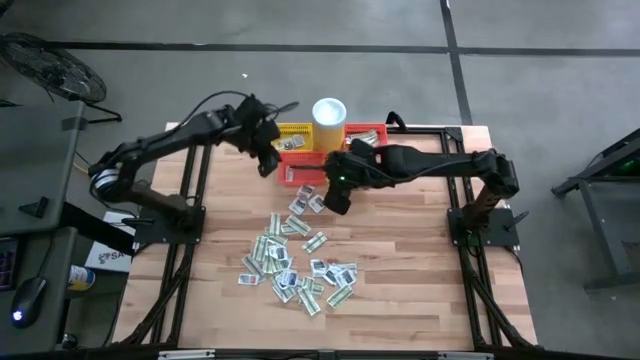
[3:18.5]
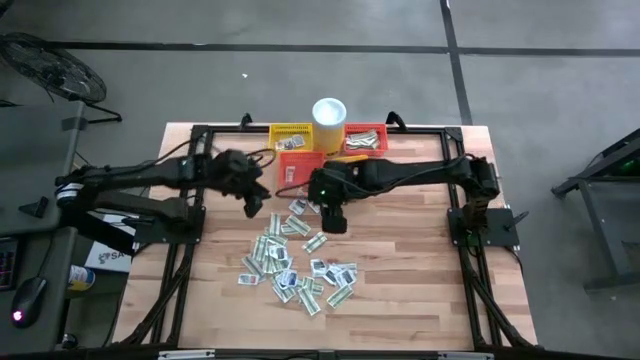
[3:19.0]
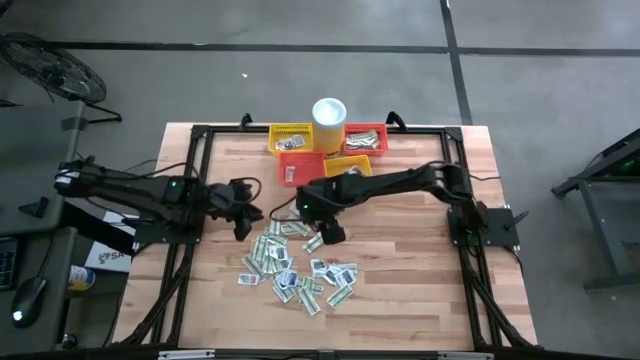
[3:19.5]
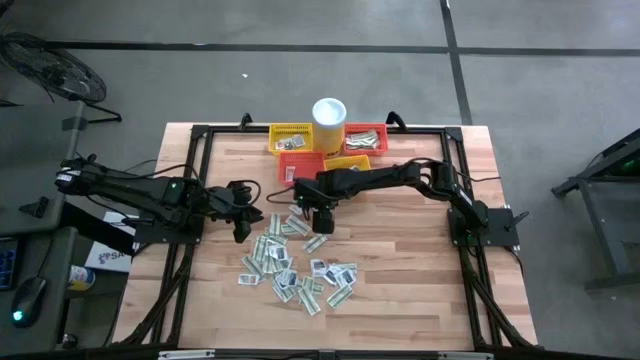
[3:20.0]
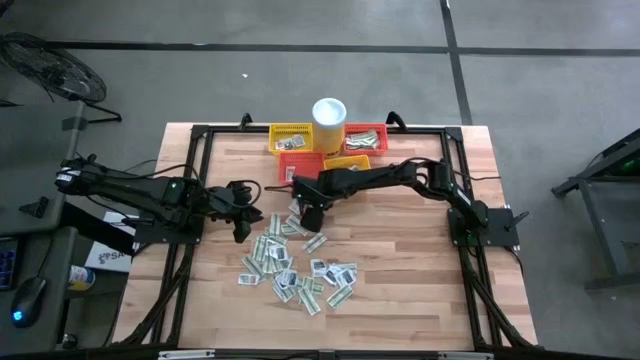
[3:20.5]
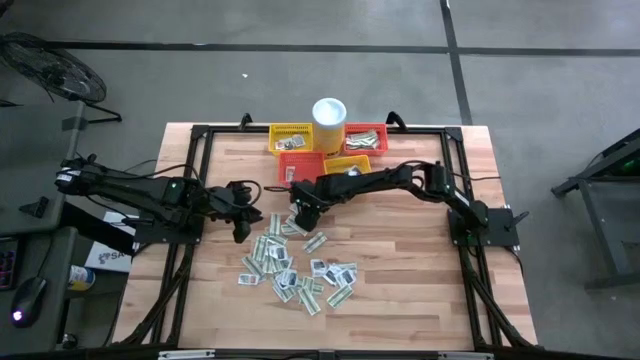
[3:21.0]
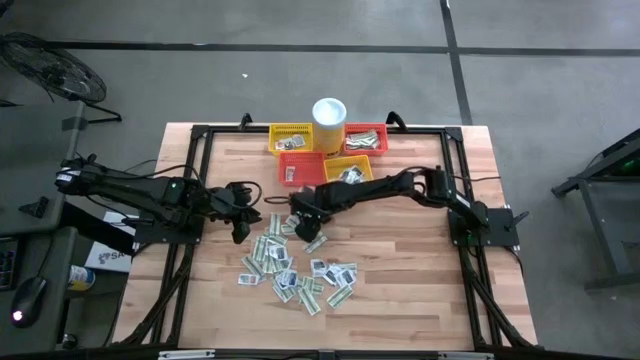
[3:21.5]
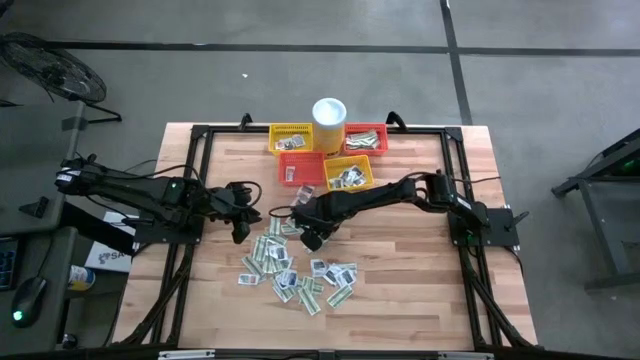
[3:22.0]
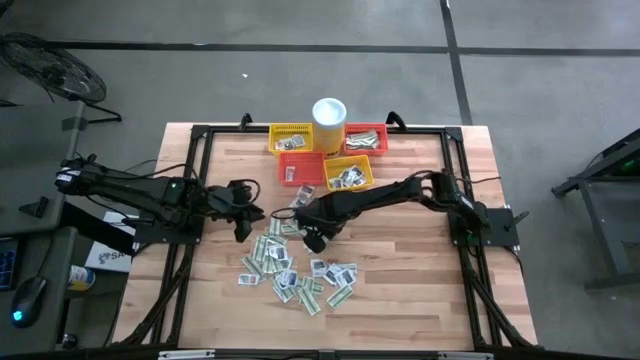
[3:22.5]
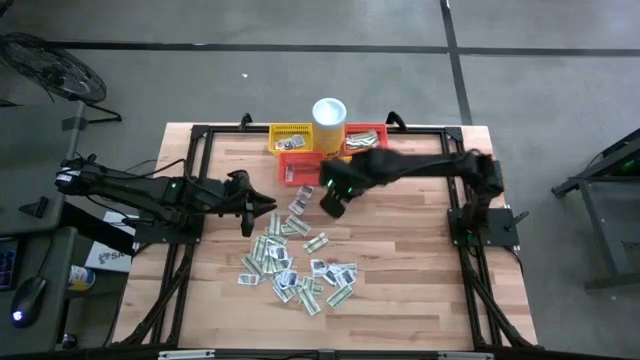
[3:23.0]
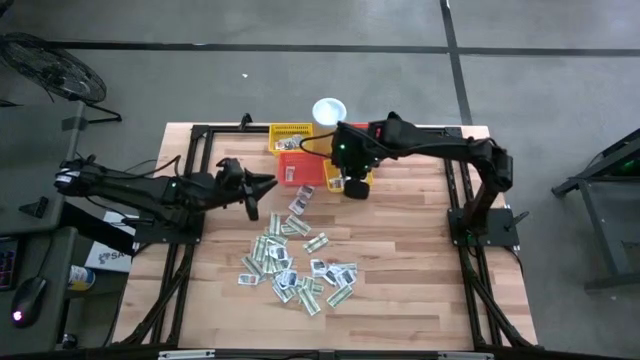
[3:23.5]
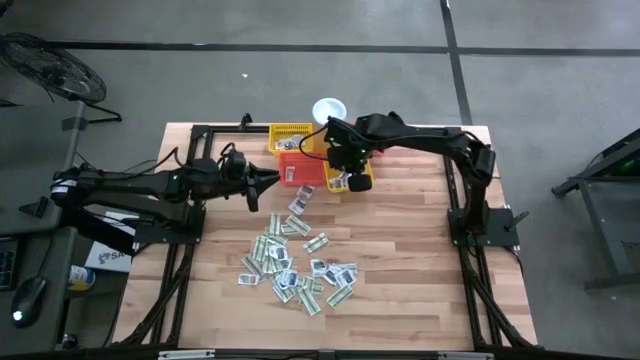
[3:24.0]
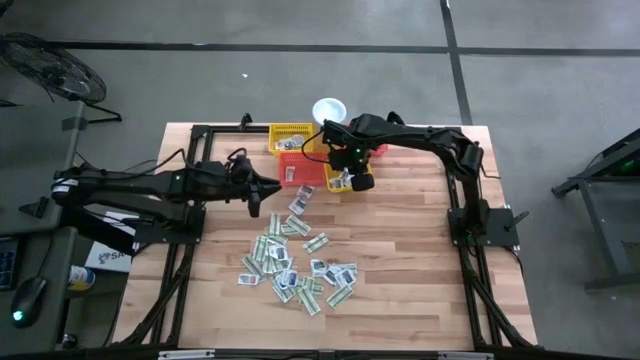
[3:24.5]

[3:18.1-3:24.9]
Task: Pick & Place First Aid Supplies
Put the black towelette pack into the bottom yellow basket

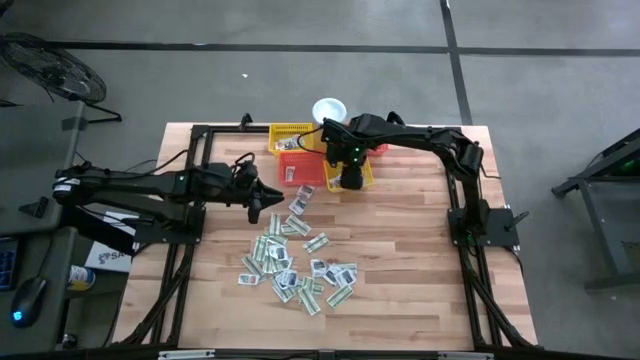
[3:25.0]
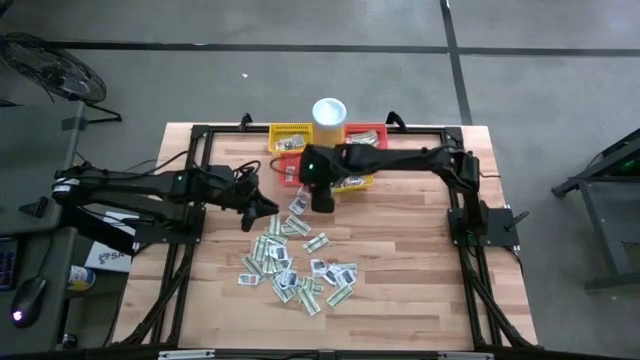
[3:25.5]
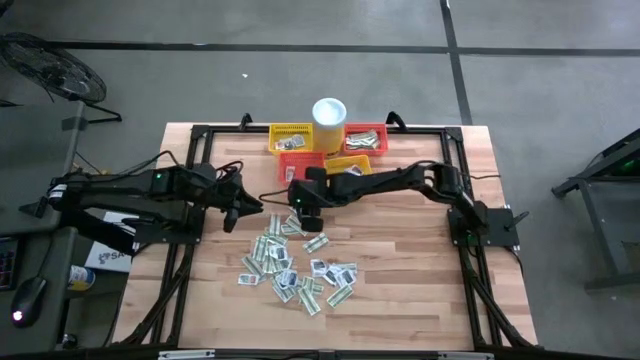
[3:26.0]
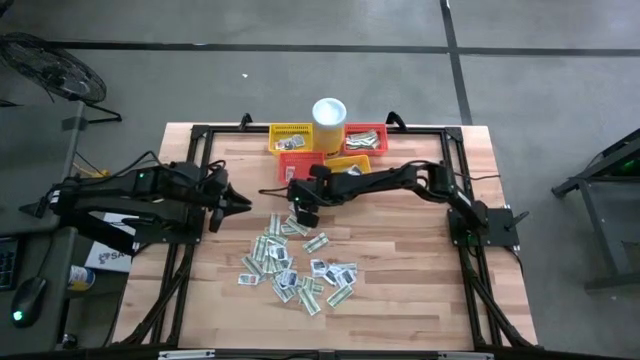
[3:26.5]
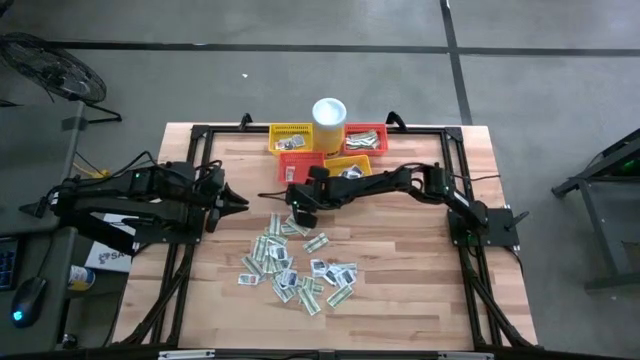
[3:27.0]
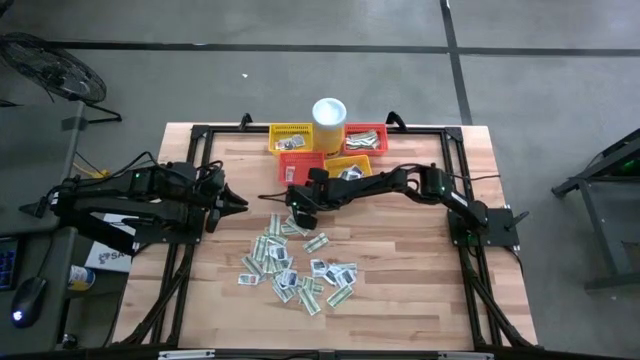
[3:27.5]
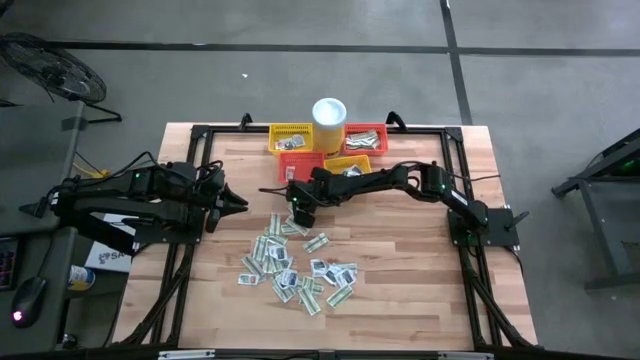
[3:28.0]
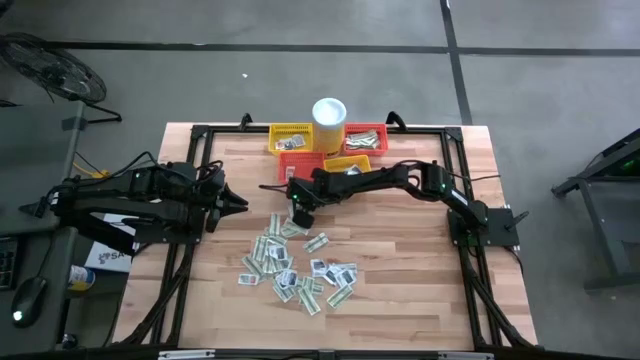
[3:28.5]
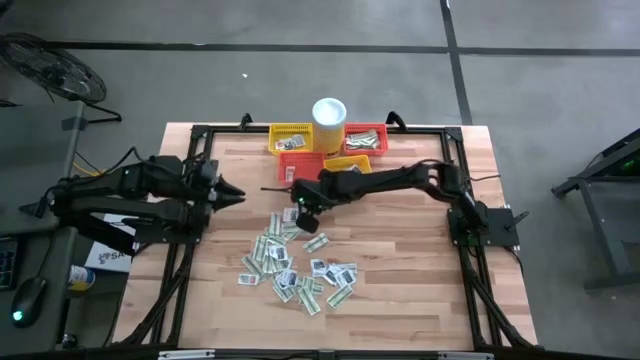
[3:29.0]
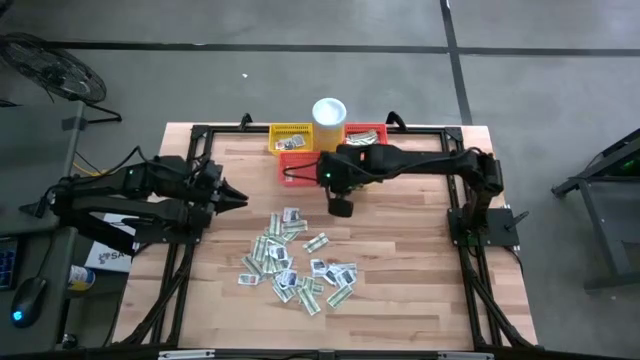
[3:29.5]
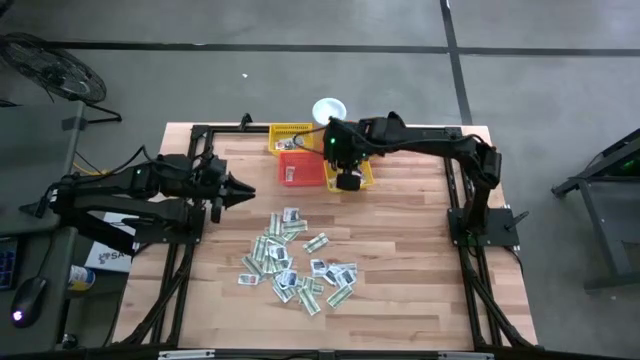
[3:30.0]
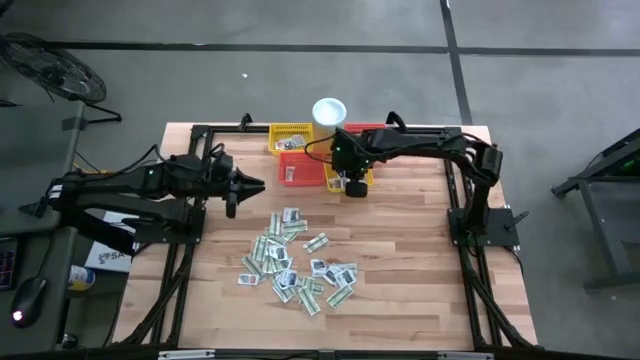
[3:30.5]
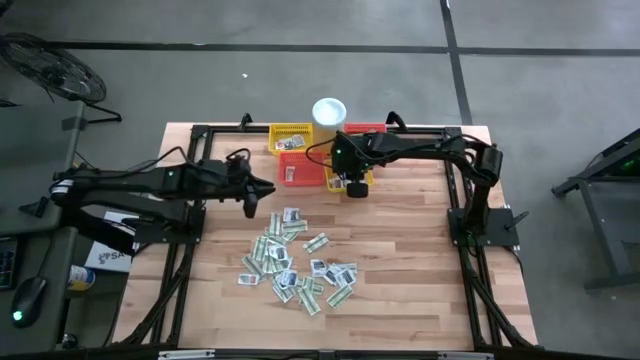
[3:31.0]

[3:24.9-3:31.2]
Put the black towelette pack into the bottom yellow basket

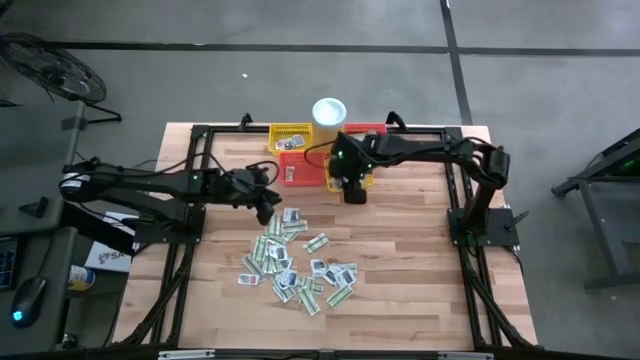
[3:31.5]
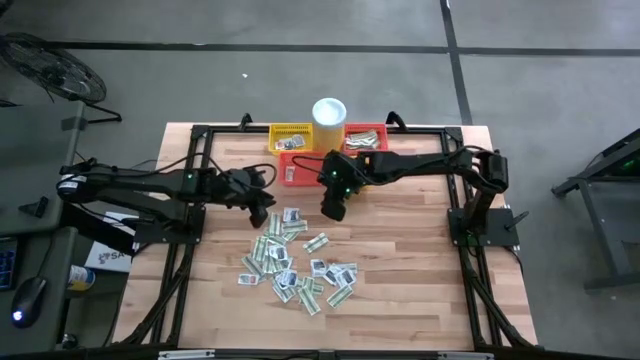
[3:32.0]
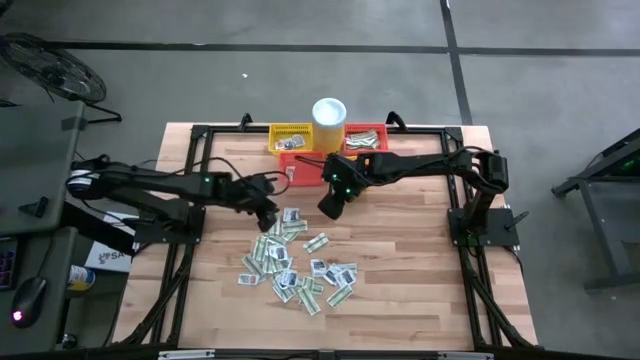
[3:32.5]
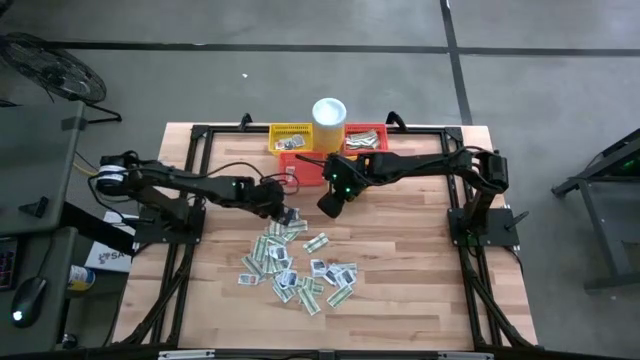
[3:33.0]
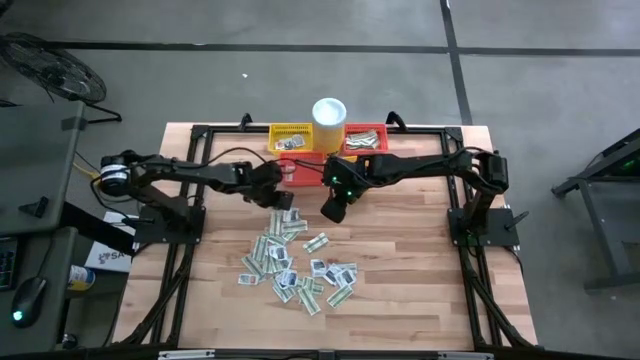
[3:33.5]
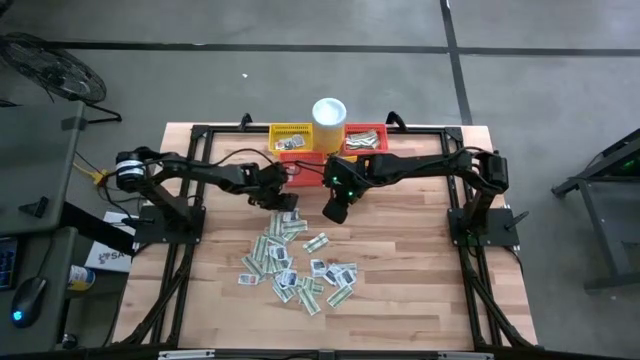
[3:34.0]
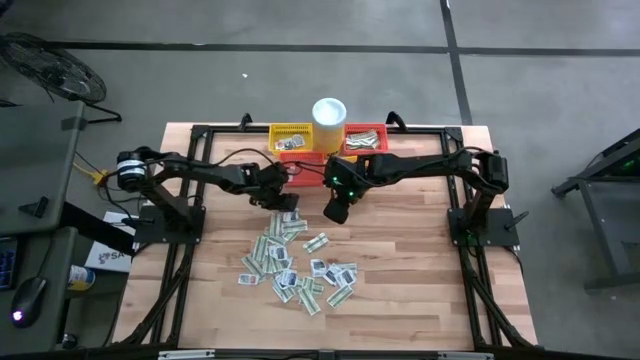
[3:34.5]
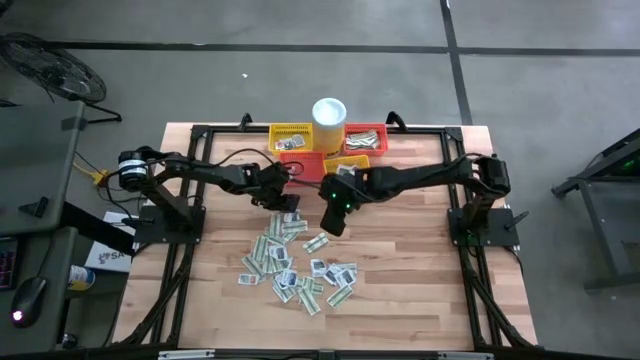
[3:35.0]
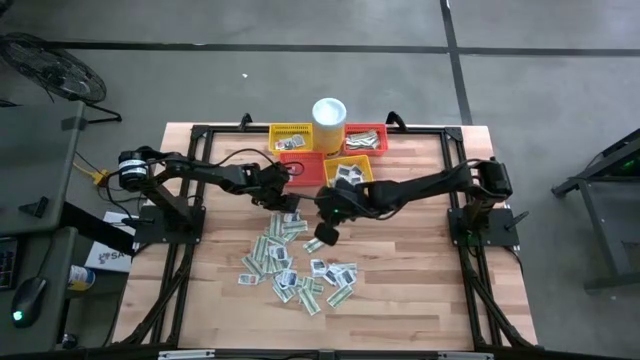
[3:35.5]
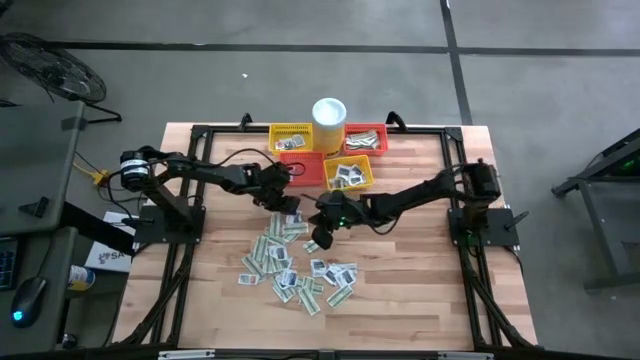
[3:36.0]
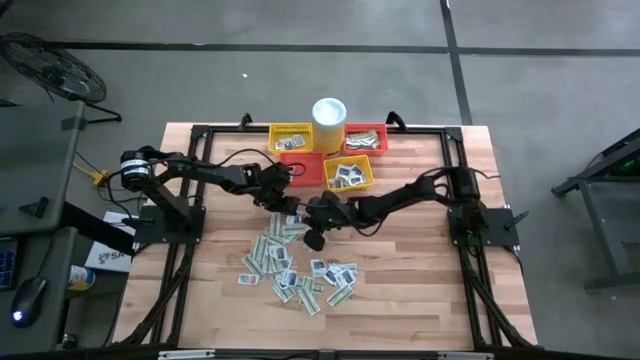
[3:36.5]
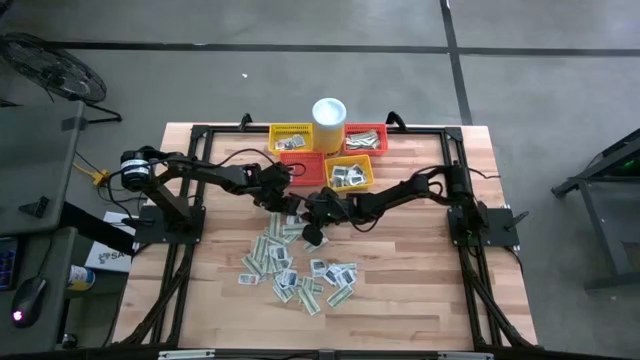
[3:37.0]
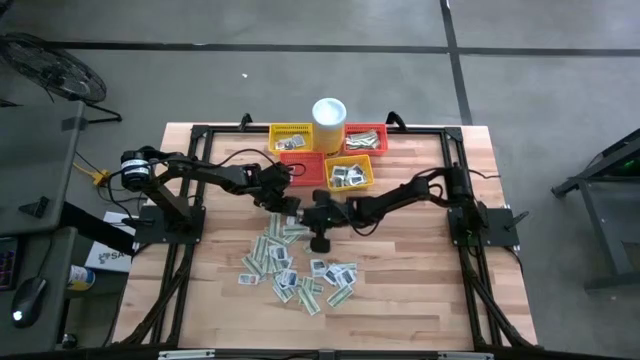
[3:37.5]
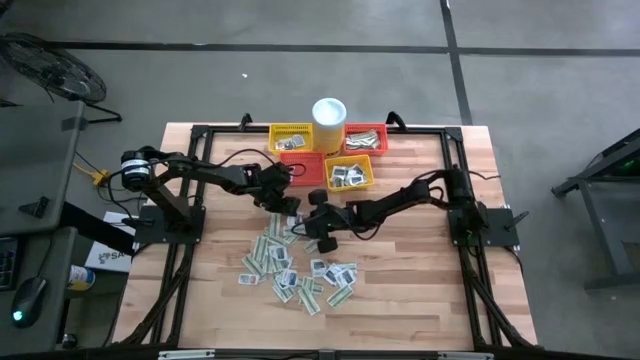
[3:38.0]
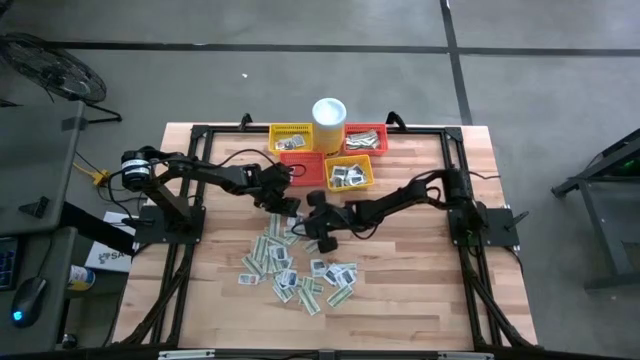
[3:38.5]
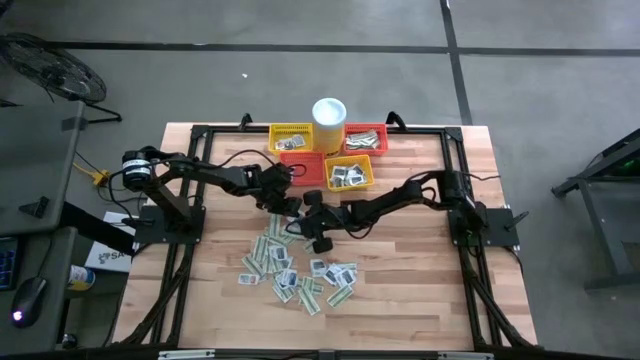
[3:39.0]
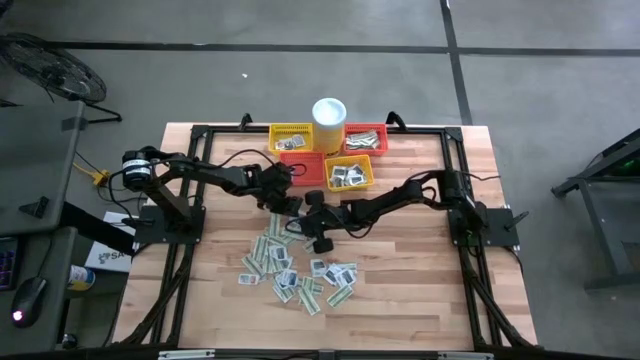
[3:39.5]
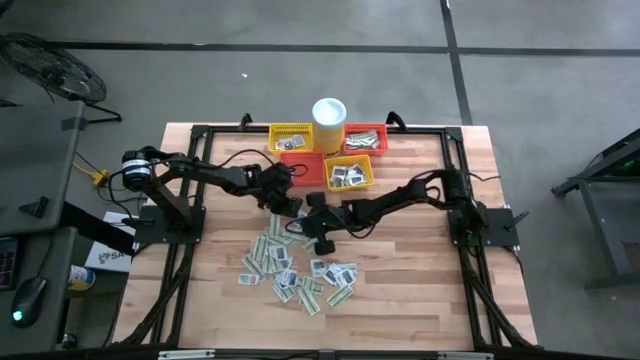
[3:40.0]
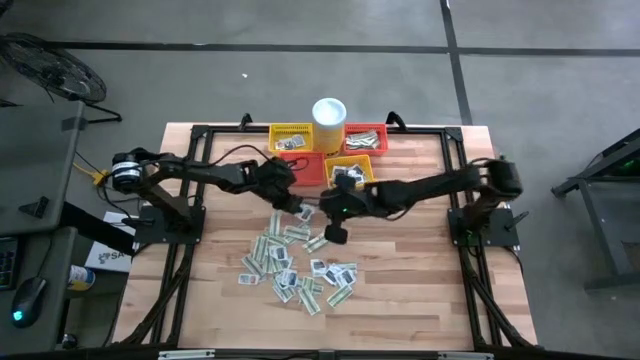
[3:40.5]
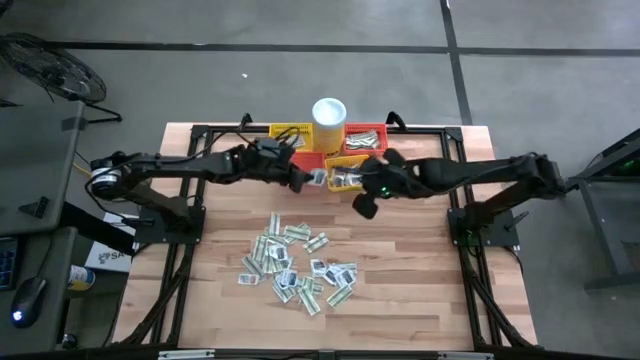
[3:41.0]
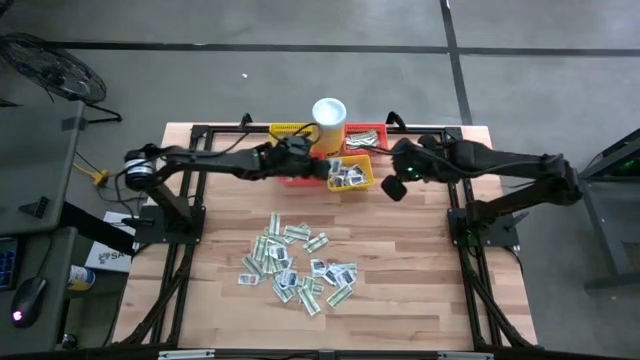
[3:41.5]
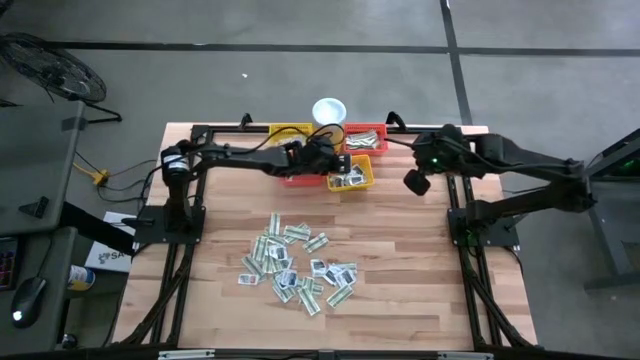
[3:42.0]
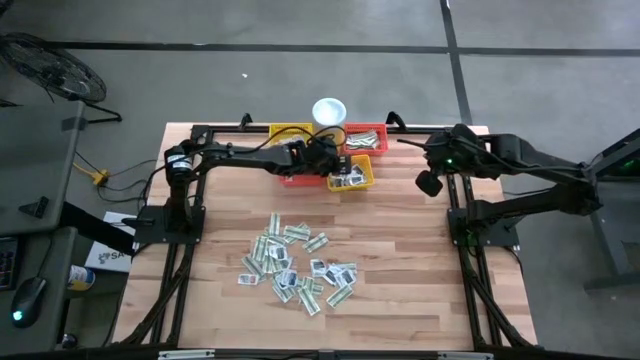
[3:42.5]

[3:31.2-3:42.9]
Put the black towelette pack into the bottom yellow basket
